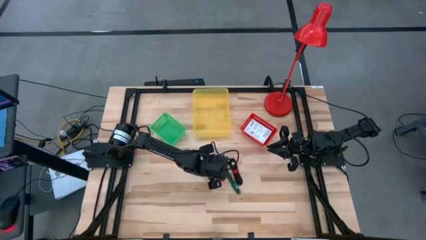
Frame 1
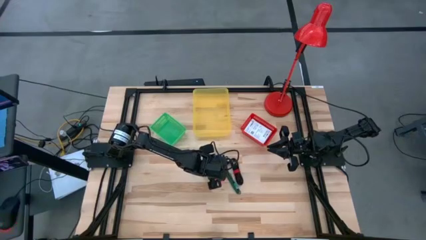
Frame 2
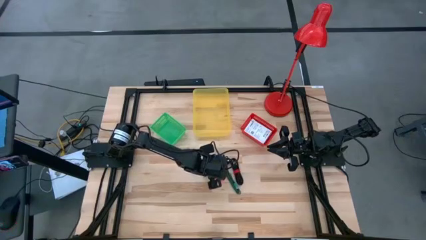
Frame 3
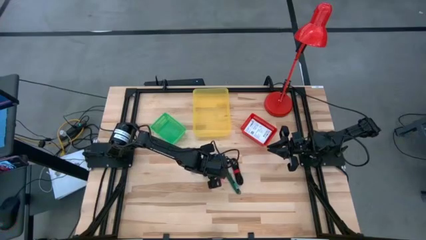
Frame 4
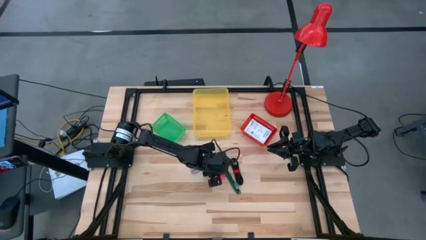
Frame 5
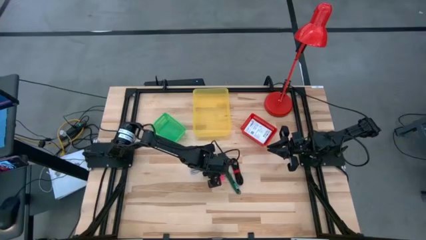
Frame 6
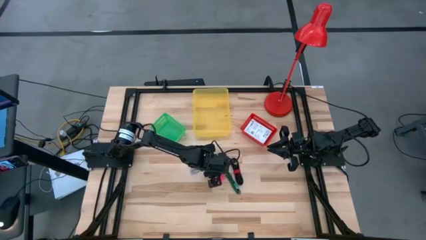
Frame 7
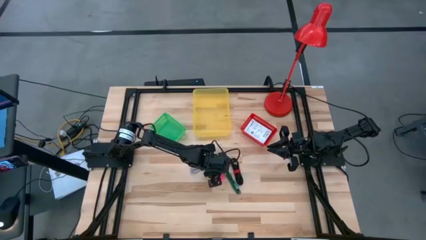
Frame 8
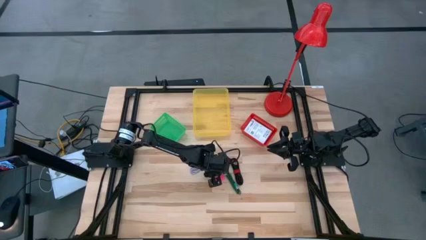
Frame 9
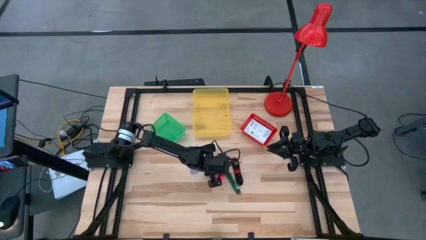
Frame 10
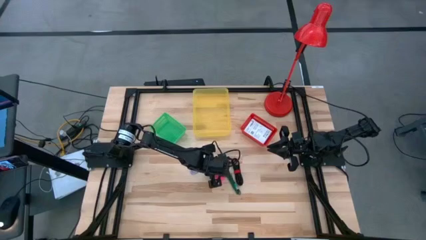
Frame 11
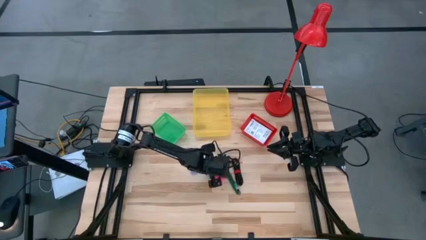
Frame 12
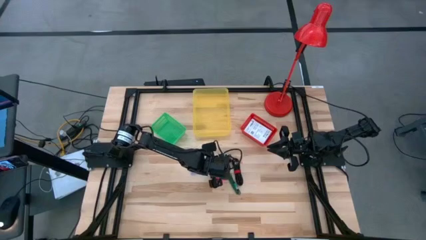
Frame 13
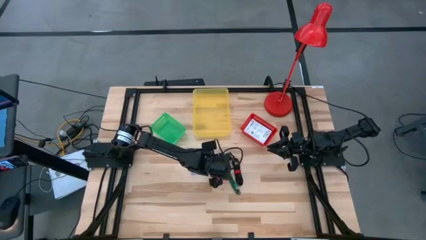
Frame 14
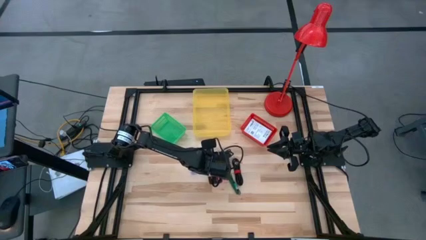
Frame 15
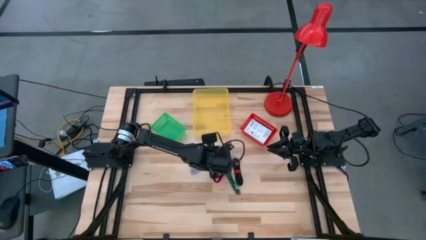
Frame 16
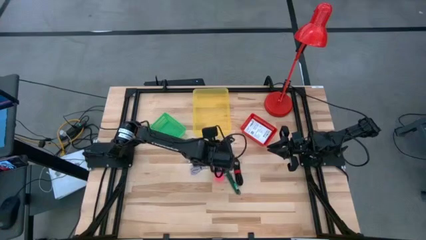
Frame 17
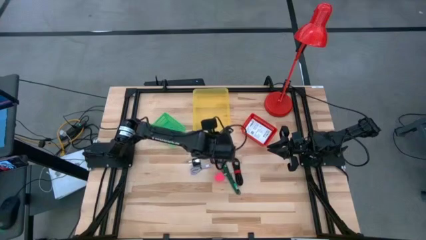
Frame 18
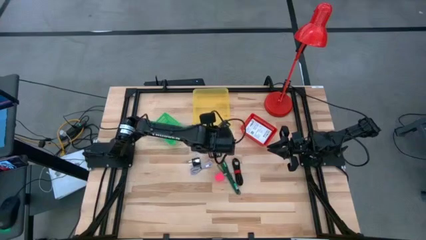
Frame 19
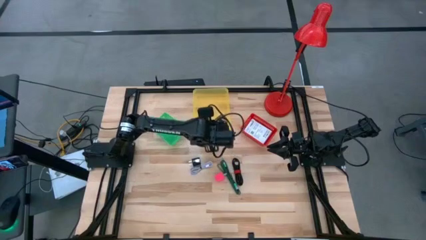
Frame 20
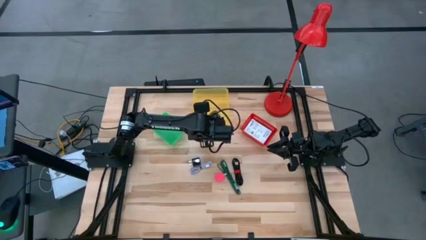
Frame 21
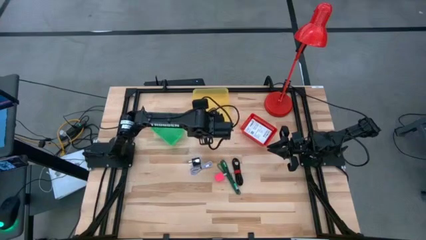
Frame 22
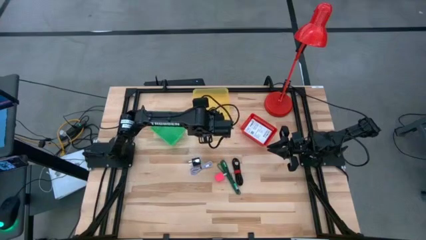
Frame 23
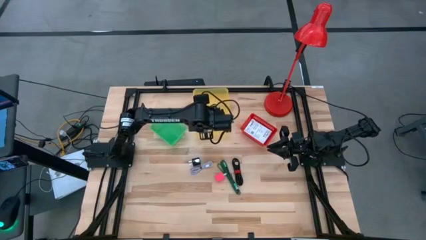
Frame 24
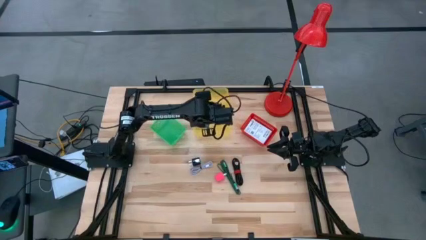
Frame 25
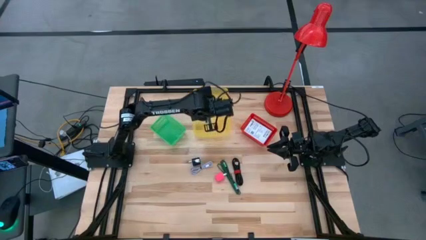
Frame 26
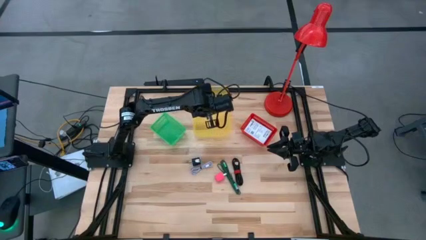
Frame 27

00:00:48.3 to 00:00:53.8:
Task: Pick and place items into bin
Put the left black charger cable into the yellow bin

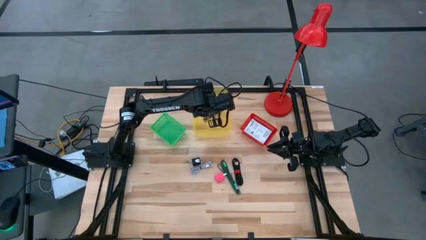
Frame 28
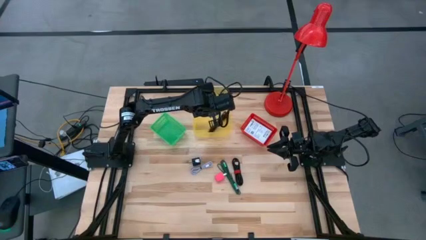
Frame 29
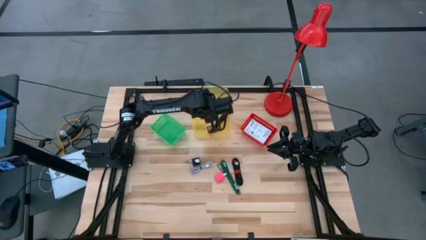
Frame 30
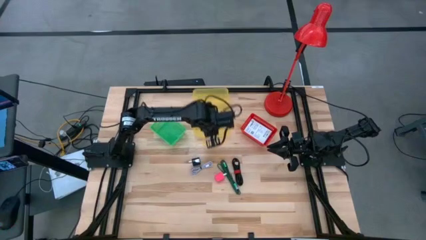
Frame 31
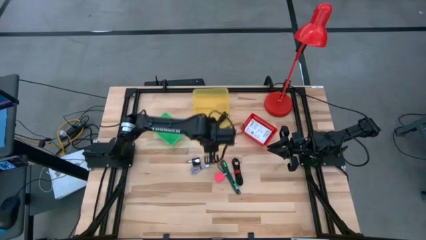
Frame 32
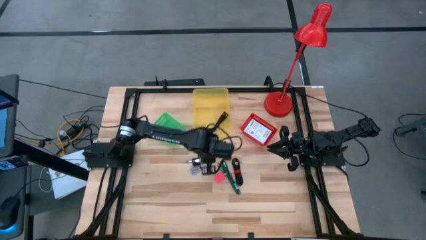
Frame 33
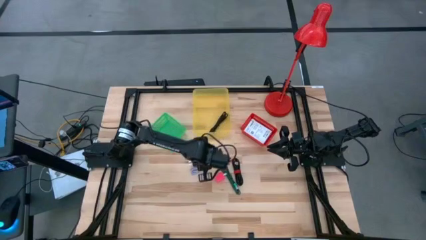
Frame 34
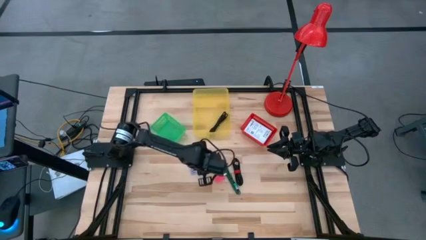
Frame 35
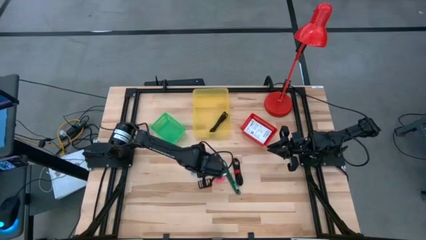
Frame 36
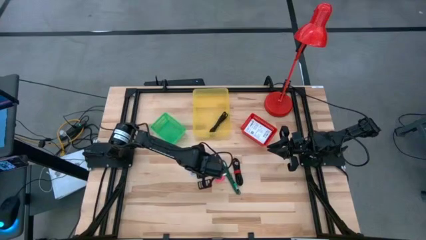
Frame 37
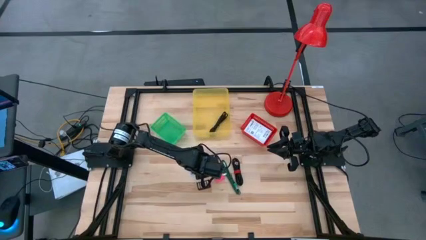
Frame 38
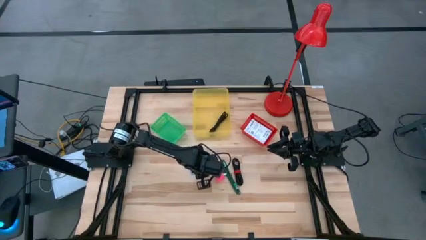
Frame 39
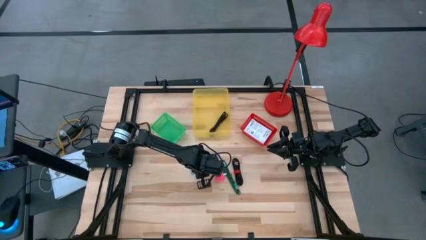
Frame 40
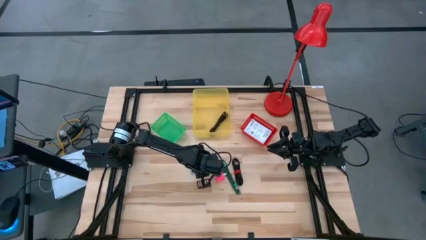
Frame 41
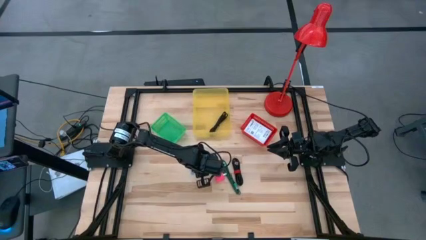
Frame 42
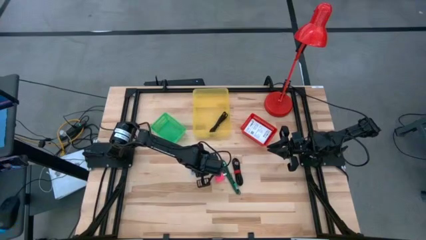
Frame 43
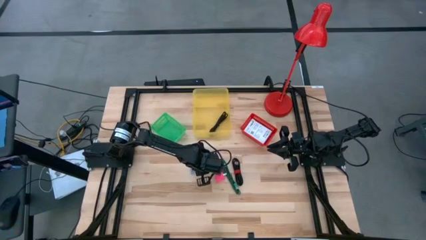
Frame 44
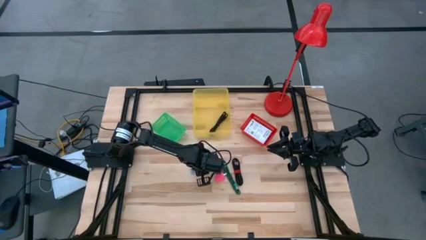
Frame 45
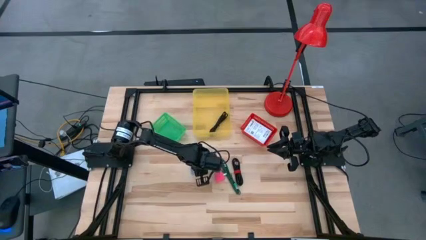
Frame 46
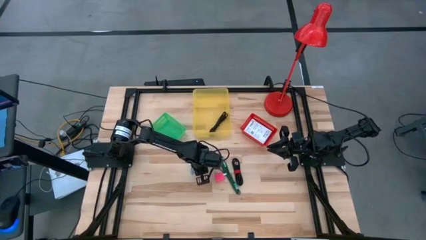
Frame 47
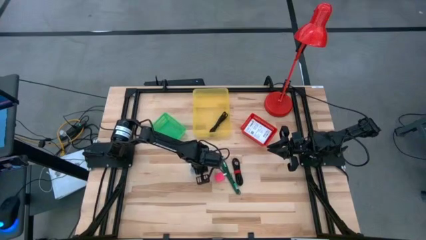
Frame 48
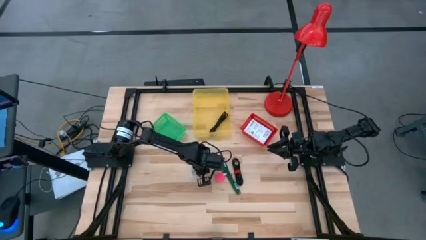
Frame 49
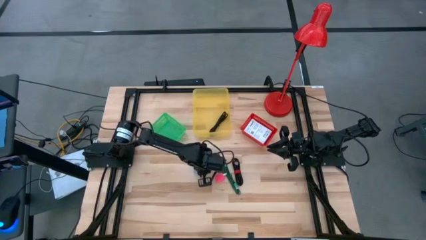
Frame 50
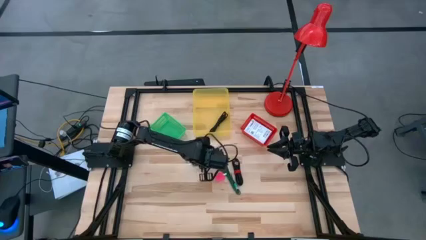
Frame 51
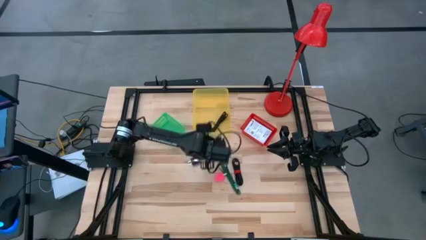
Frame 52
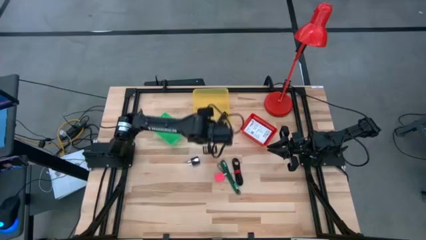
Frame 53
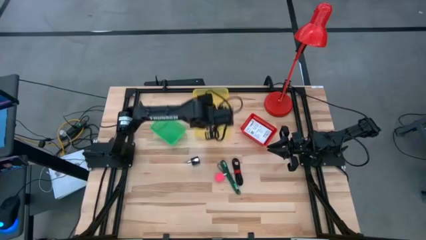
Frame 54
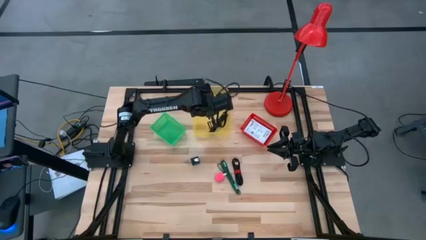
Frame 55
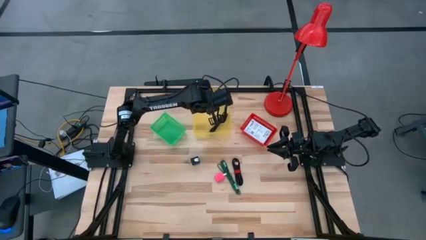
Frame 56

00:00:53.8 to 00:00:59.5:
Put the white charger cable into the yellow bin

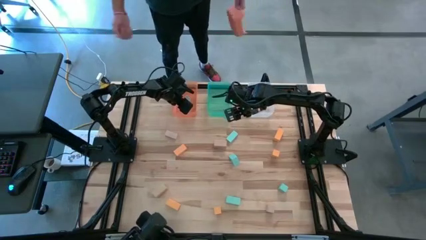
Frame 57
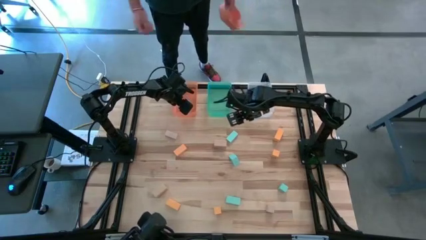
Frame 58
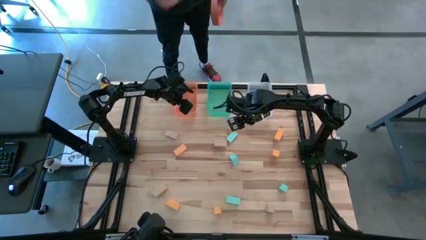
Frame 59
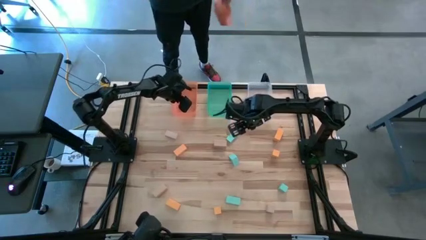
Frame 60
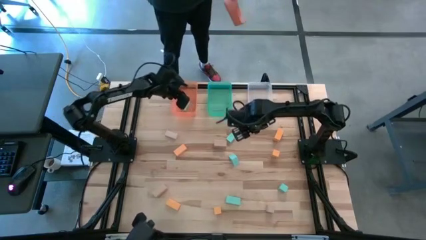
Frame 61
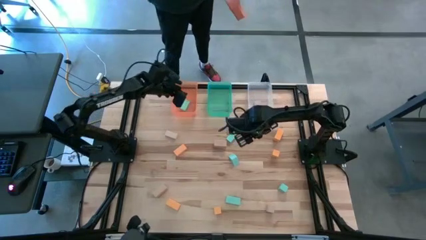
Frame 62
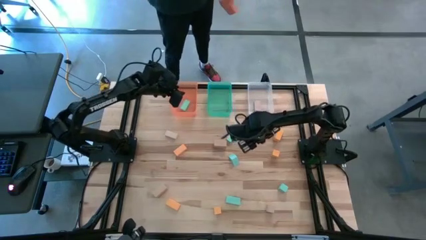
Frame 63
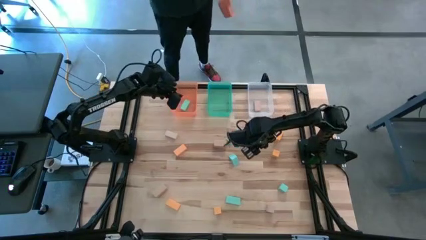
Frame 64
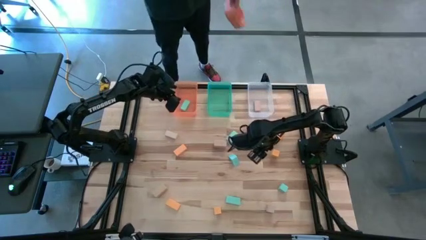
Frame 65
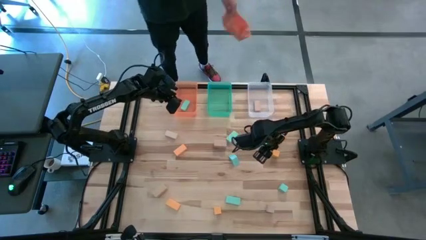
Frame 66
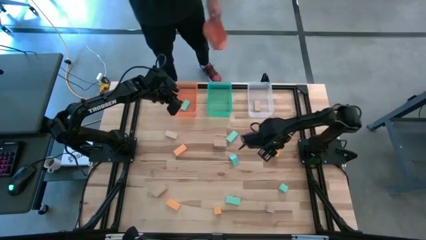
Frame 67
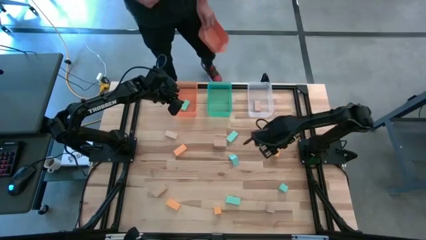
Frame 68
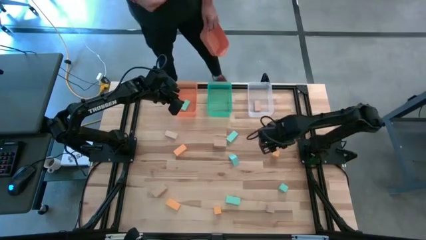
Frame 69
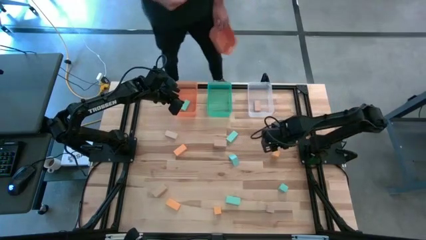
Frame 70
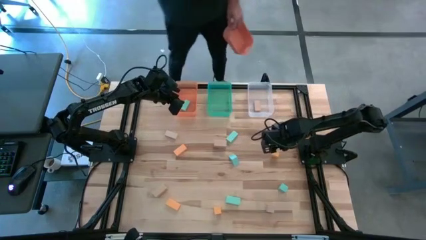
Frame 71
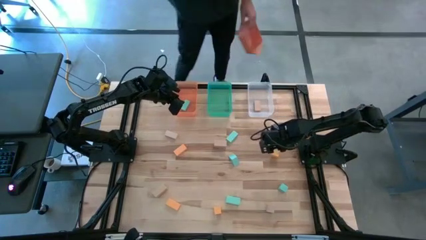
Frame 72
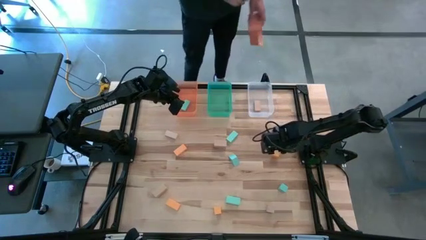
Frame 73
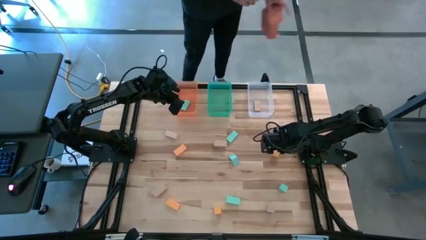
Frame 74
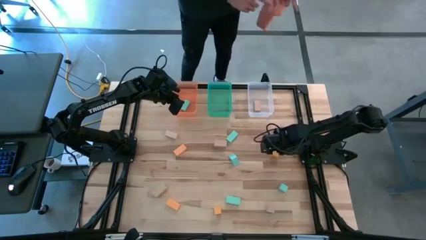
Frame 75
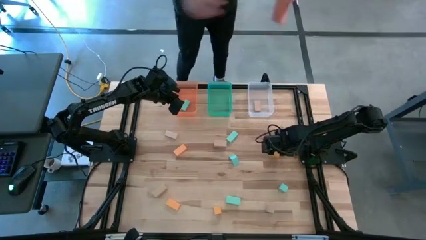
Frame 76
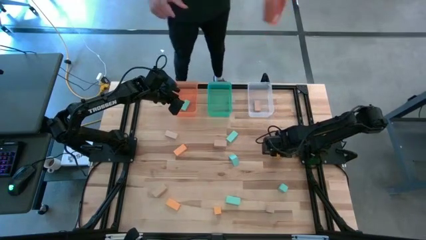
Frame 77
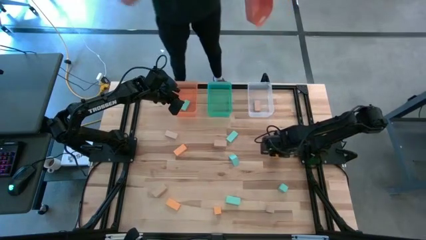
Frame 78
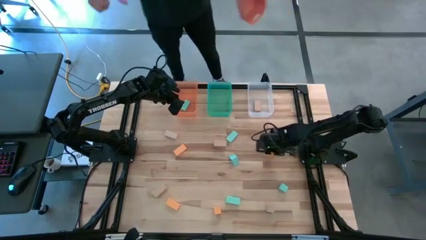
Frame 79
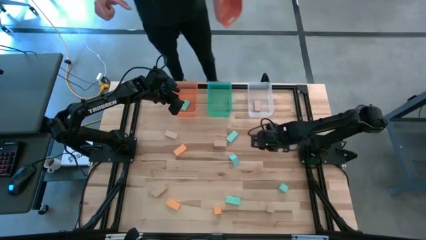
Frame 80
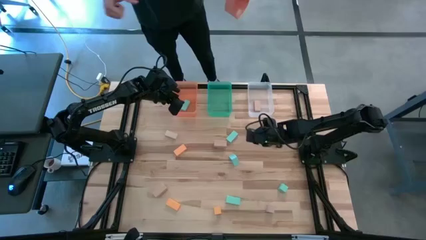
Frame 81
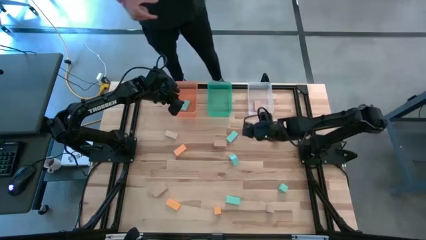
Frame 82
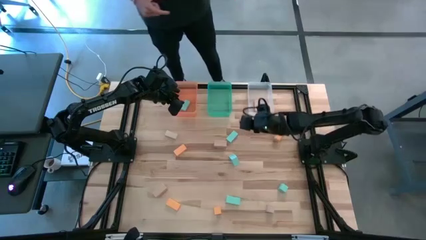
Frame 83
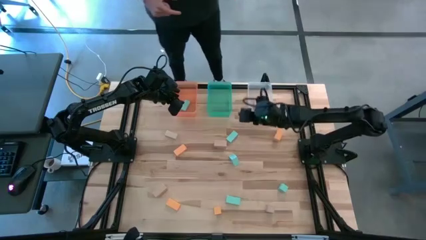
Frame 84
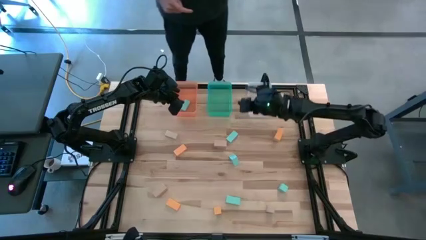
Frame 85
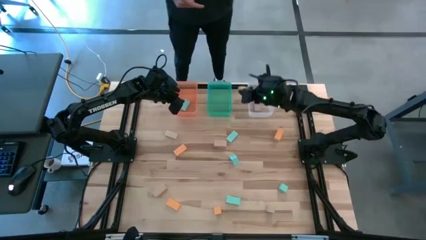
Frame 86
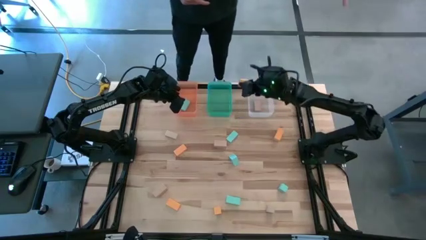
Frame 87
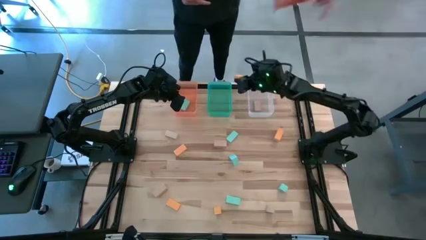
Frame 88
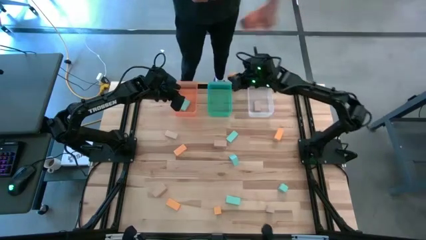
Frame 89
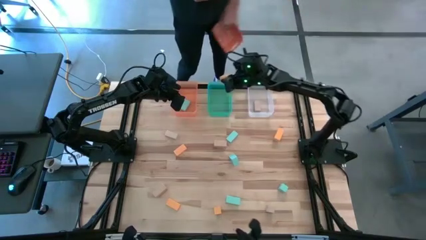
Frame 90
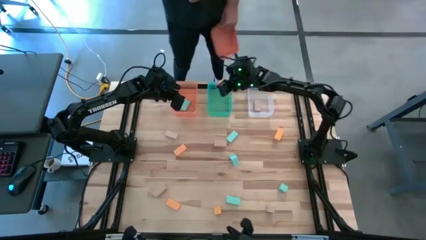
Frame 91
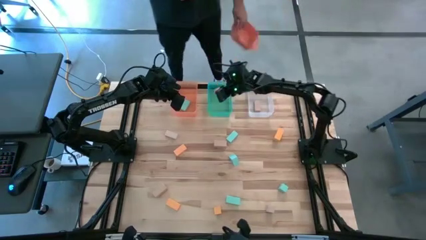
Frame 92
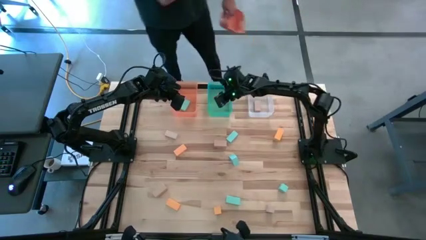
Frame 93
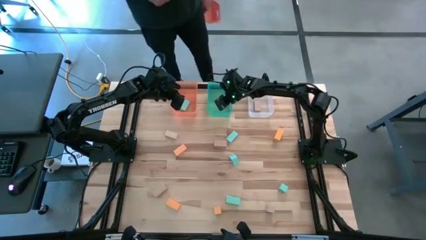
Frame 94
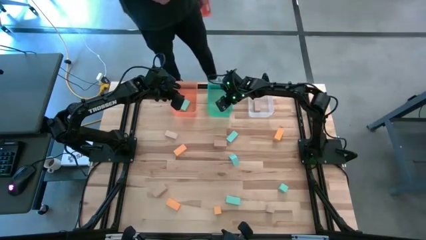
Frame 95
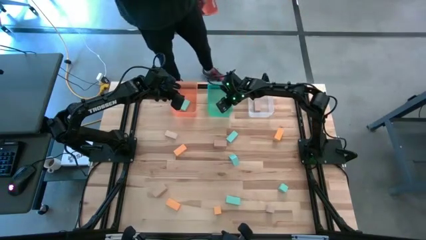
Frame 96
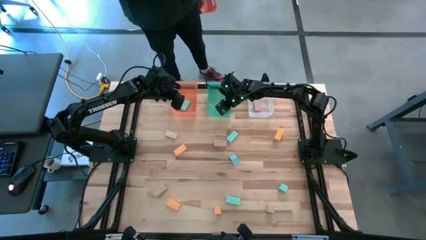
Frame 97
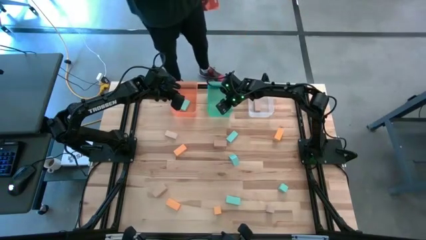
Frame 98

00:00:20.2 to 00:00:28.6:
Task: Sort & place blocks by color
Put the yellow block into the green bin
